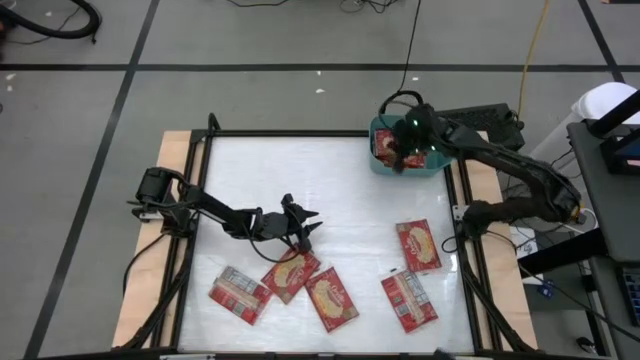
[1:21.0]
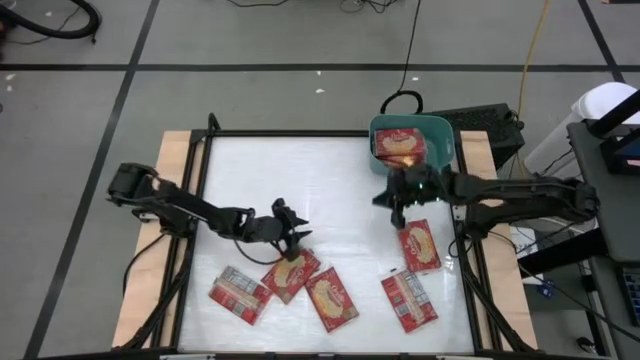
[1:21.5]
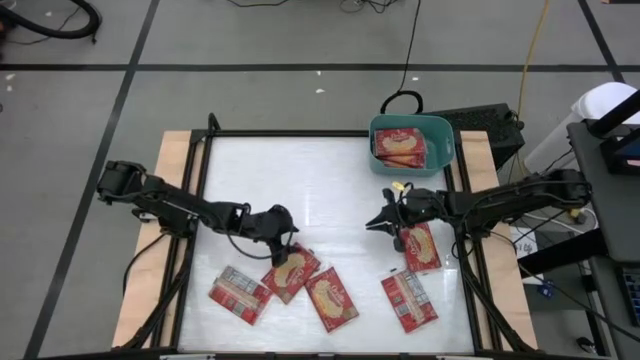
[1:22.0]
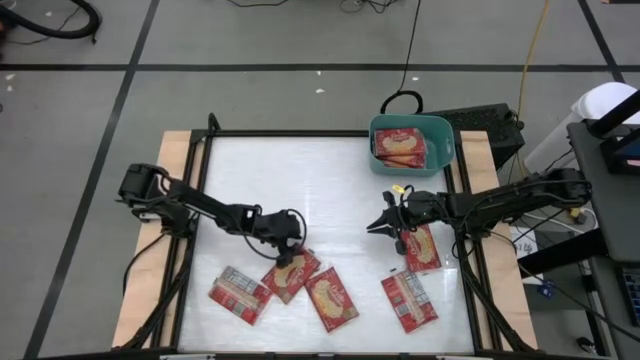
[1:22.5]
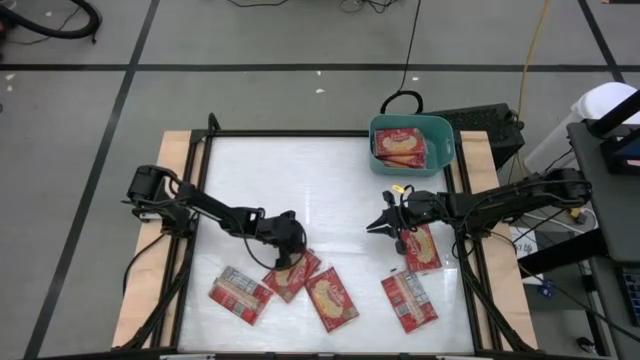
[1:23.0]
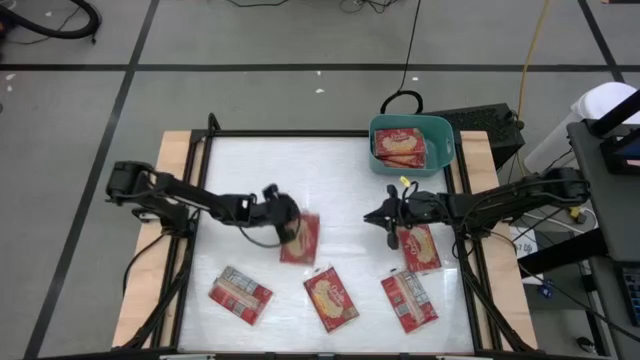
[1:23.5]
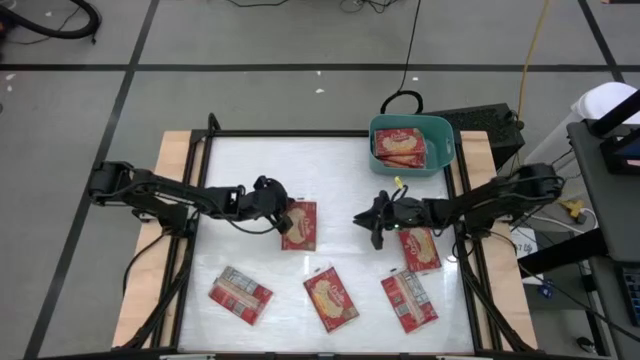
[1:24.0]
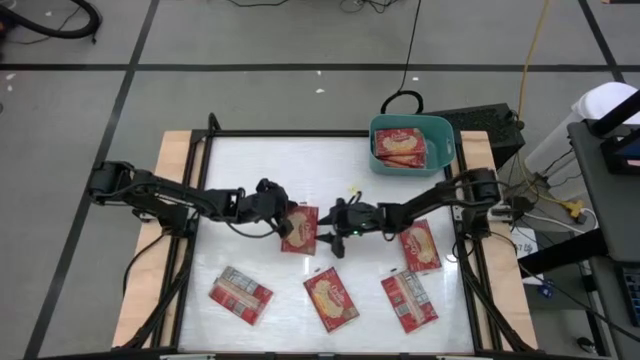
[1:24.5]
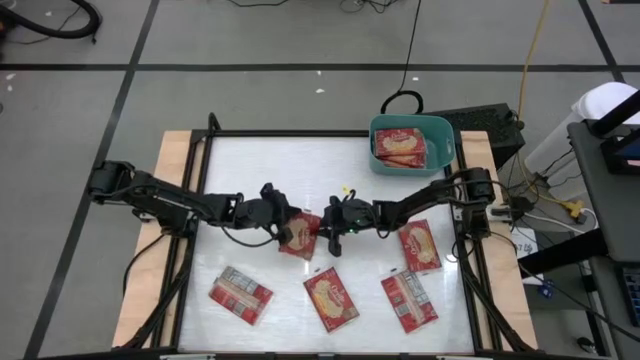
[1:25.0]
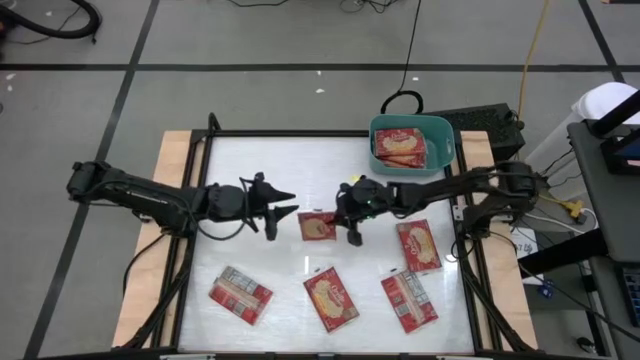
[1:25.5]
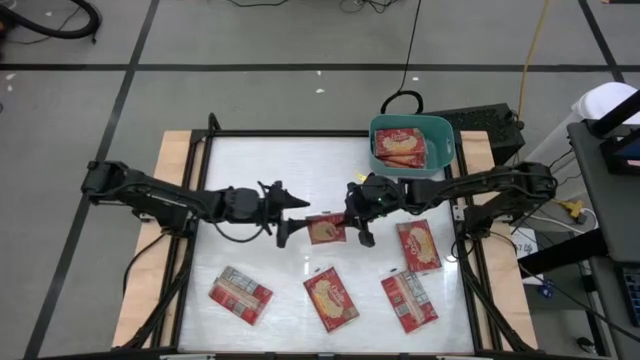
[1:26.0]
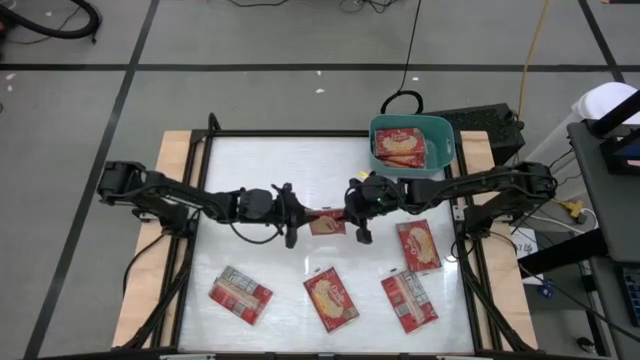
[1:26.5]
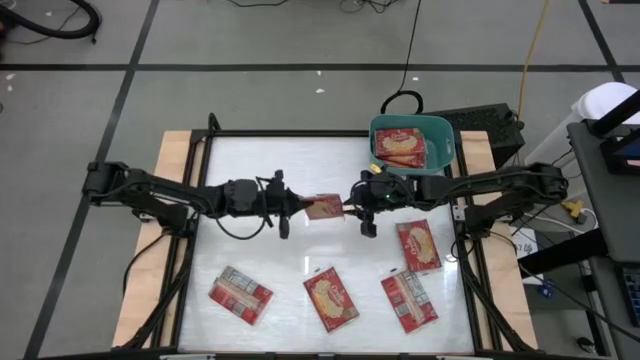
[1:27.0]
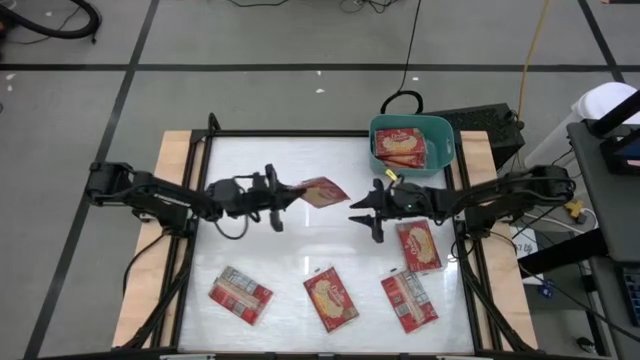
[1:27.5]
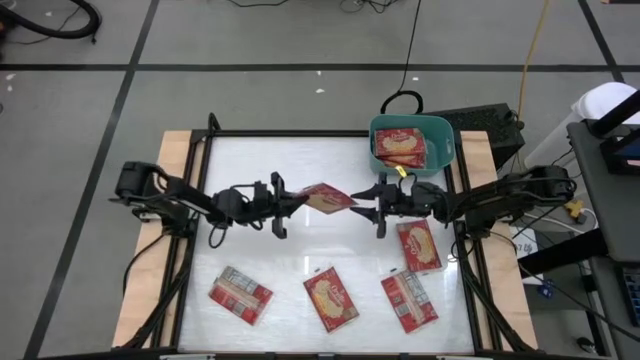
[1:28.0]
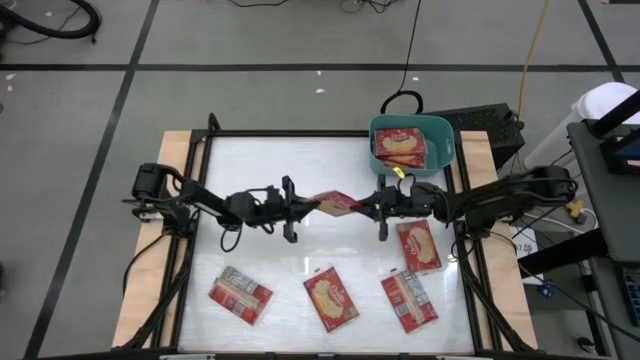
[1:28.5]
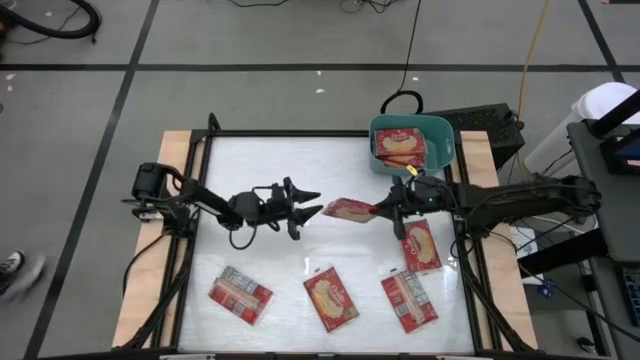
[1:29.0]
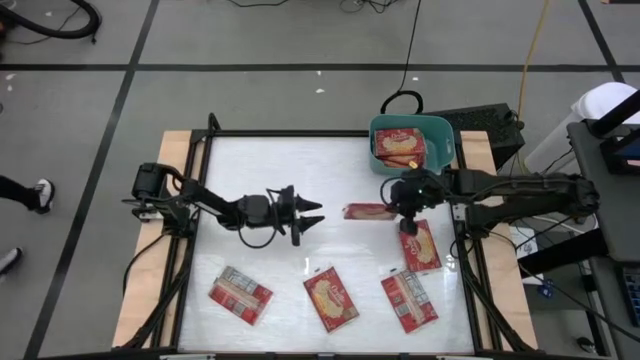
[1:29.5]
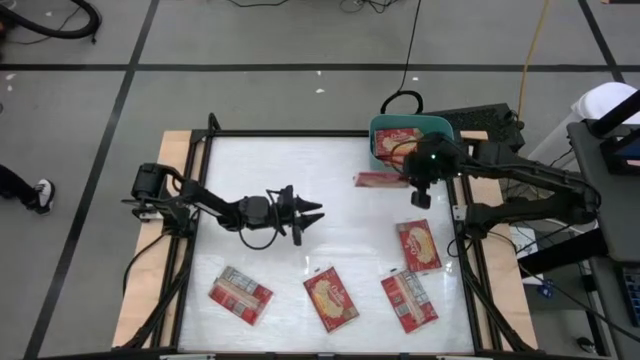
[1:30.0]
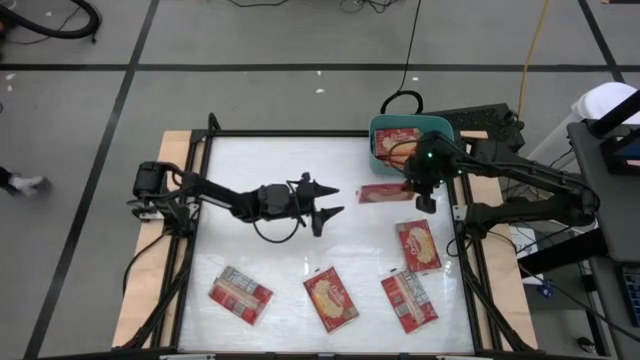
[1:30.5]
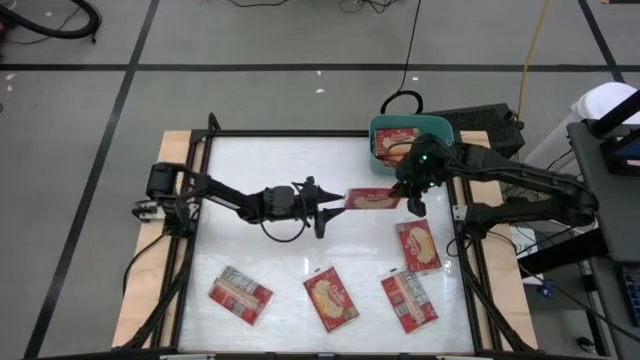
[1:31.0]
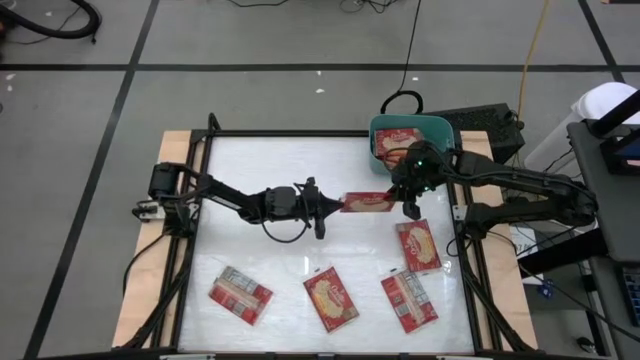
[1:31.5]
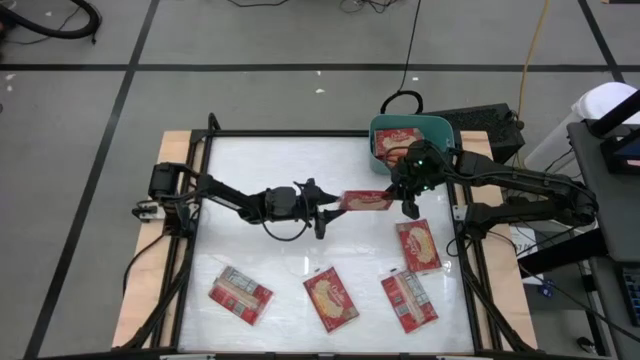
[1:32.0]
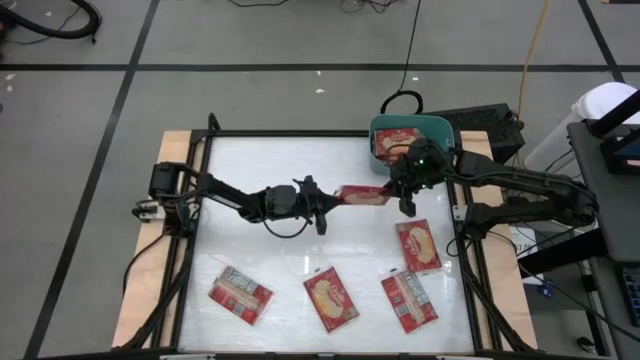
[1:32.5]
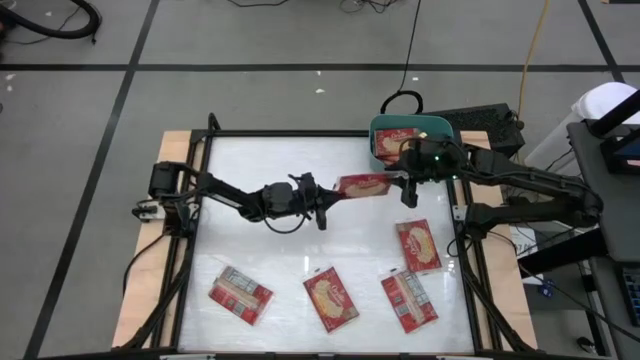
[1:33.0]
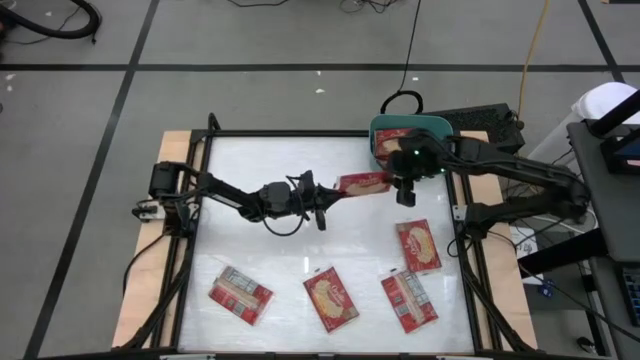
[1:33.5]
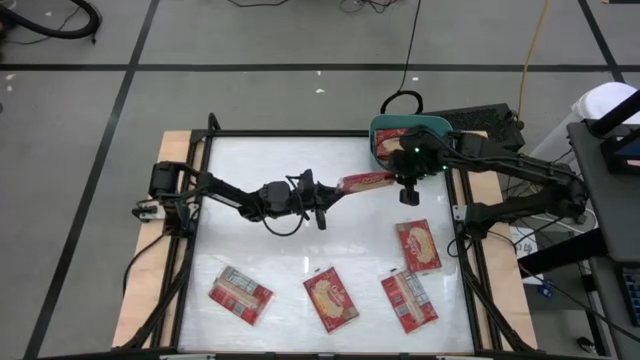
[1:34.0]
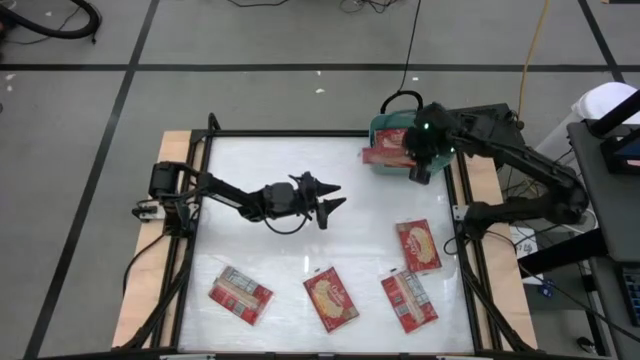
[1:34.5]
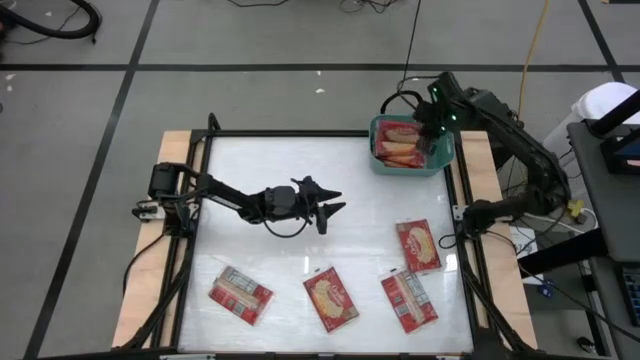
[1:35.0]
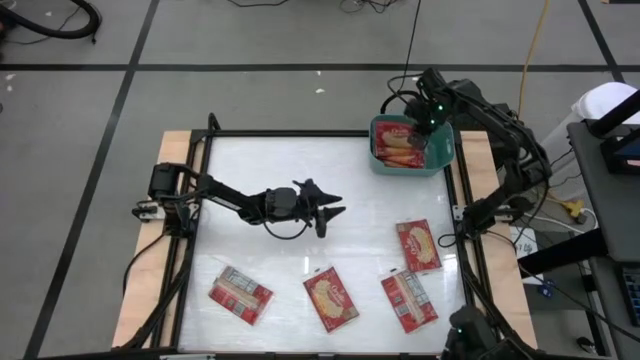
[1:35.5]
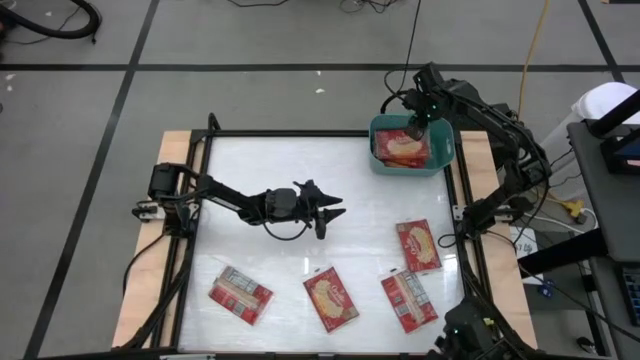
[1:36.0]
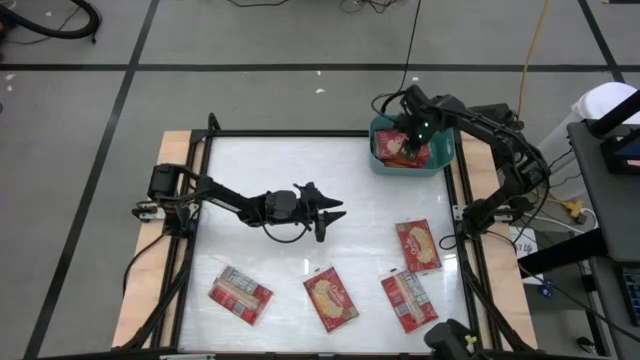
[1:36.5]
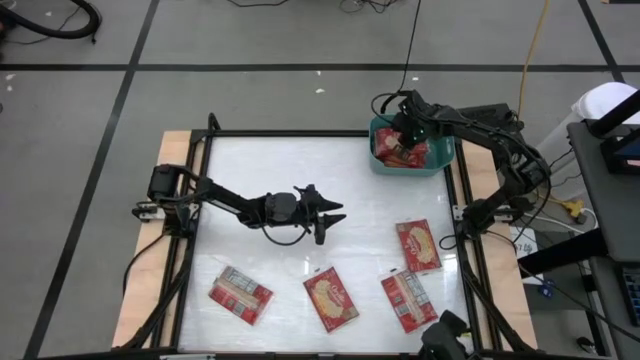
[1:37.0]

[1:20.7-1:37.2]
Task: Sort popcorn bags into baskets
Put the red popcorn bag into the green bin

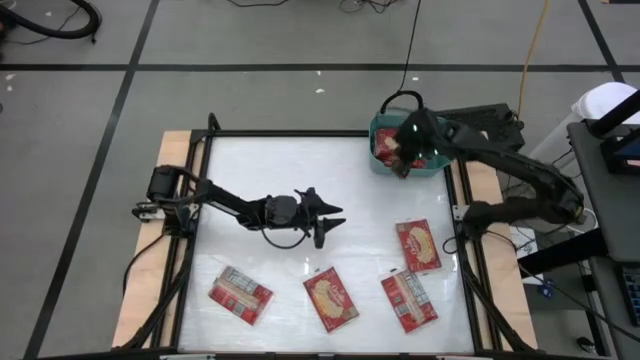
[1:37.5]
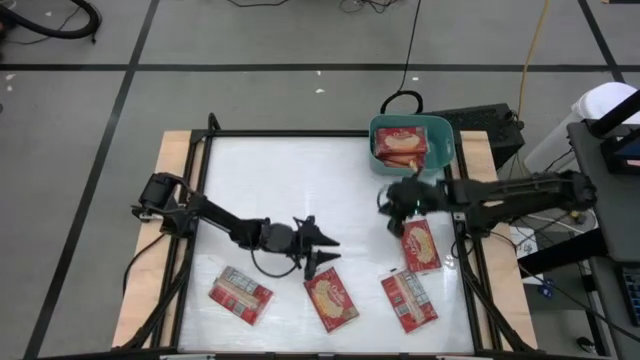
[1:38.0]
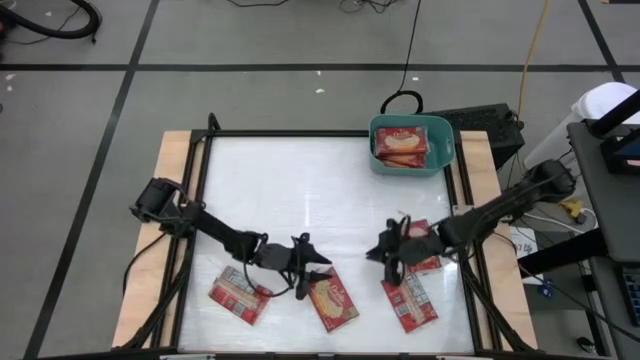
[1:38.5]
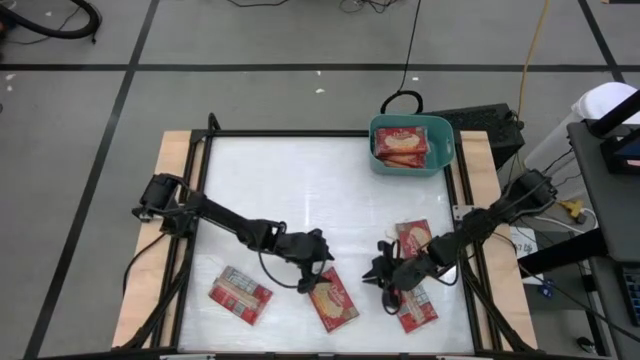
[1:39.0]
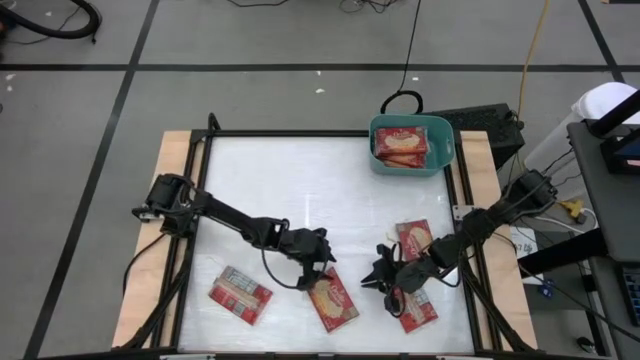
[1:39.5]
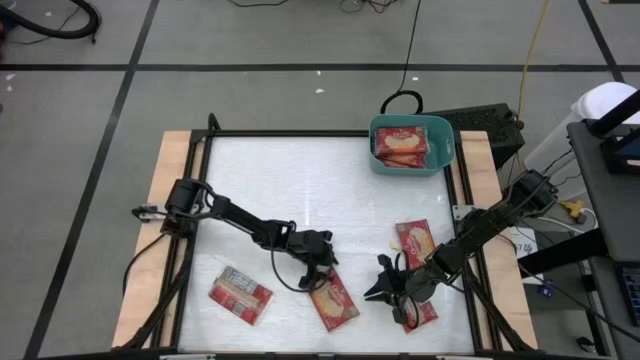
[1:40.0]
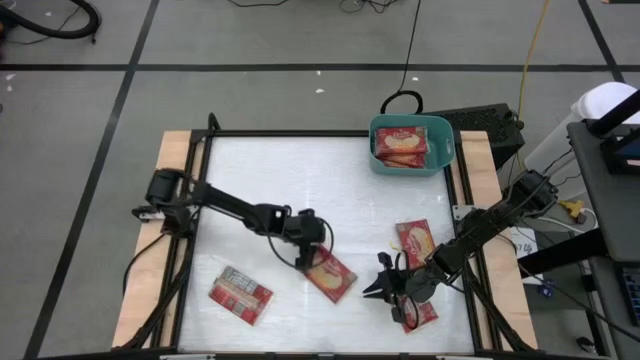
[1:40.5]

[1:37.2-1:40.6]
Put the red popcorn bag into the green bin
